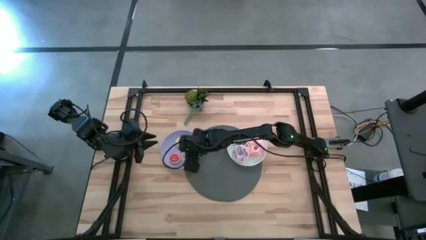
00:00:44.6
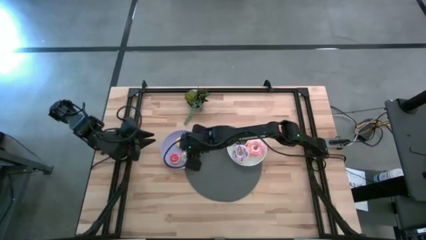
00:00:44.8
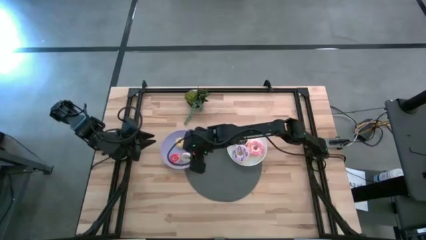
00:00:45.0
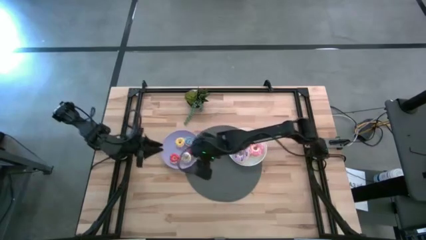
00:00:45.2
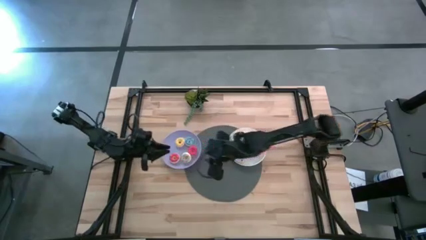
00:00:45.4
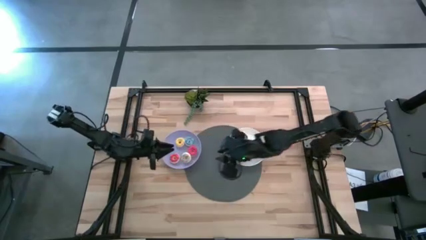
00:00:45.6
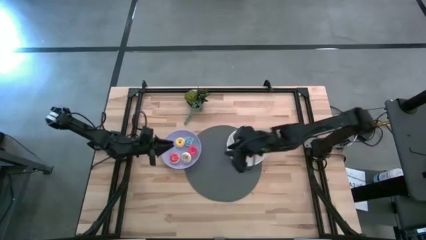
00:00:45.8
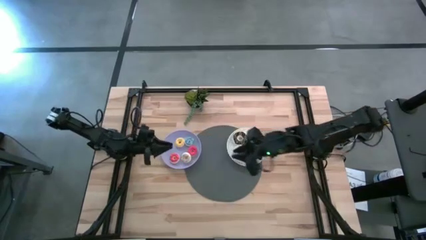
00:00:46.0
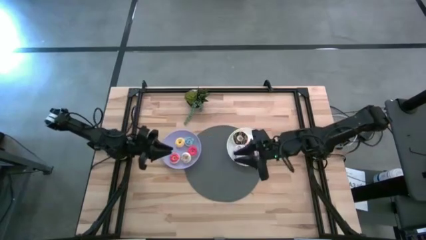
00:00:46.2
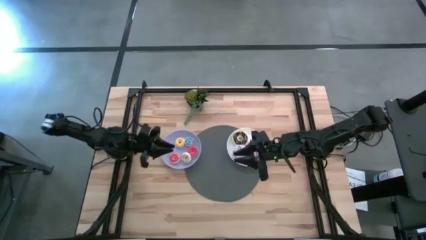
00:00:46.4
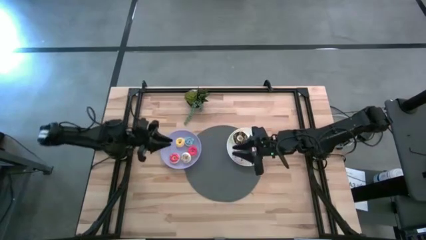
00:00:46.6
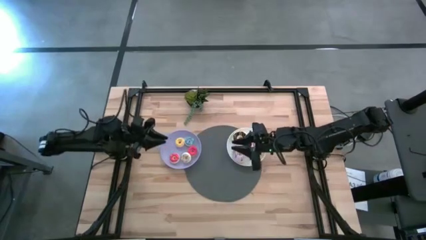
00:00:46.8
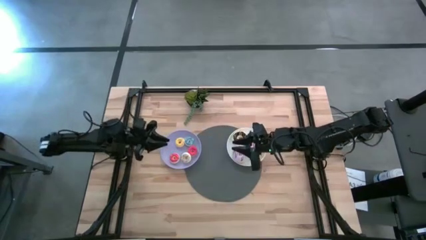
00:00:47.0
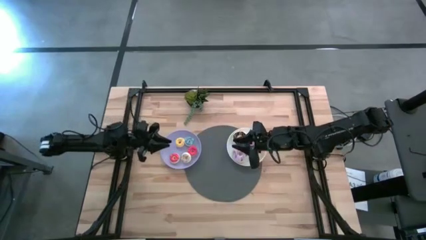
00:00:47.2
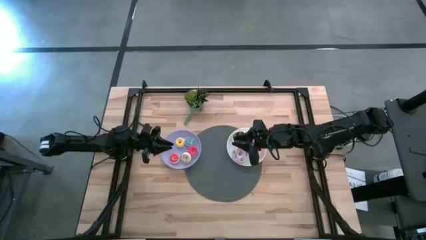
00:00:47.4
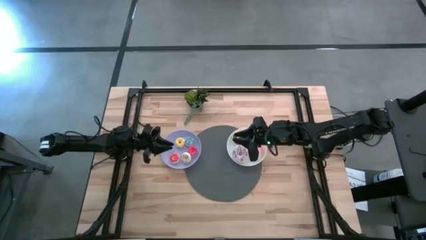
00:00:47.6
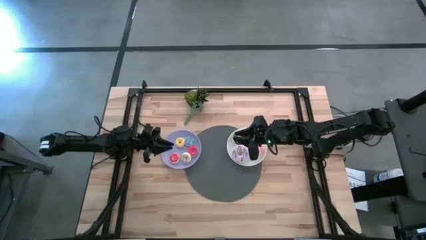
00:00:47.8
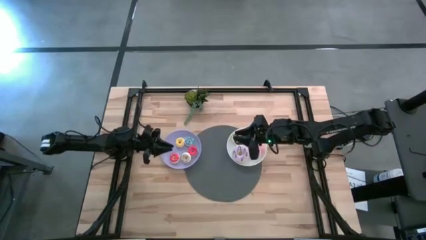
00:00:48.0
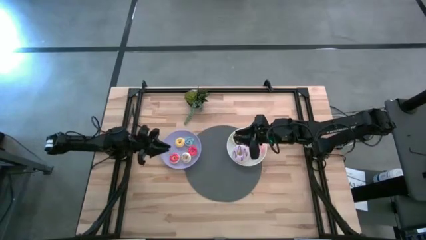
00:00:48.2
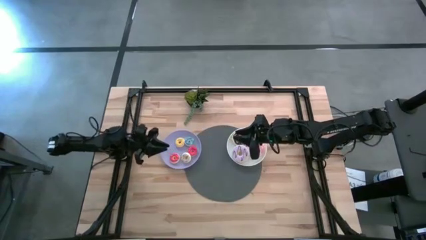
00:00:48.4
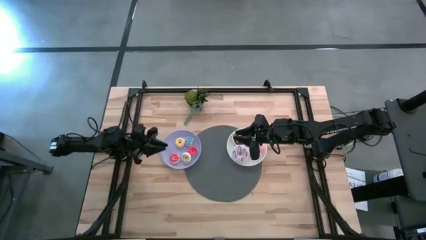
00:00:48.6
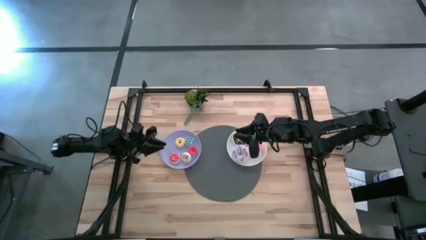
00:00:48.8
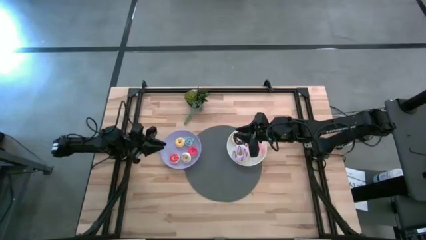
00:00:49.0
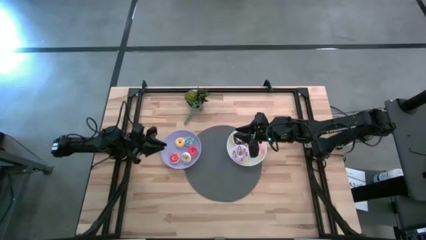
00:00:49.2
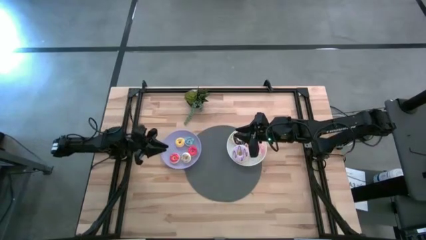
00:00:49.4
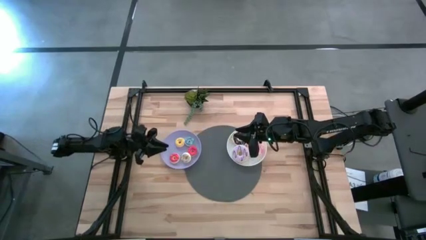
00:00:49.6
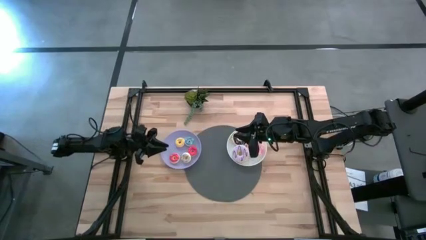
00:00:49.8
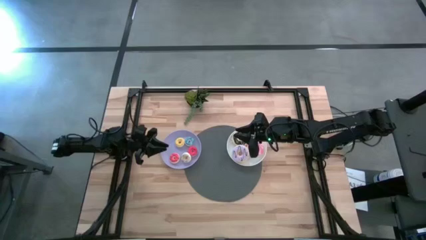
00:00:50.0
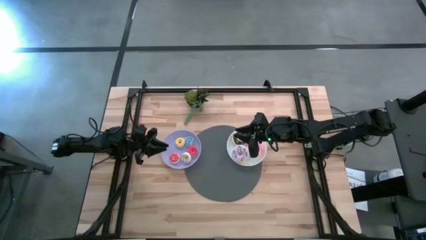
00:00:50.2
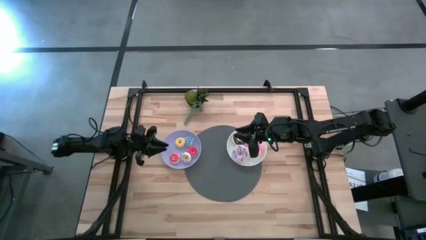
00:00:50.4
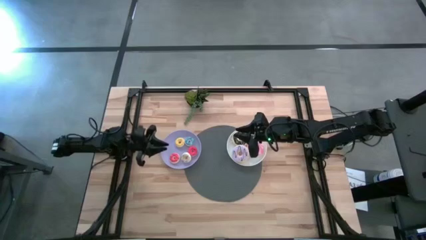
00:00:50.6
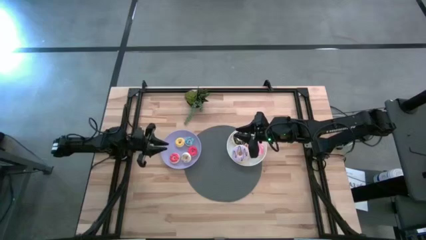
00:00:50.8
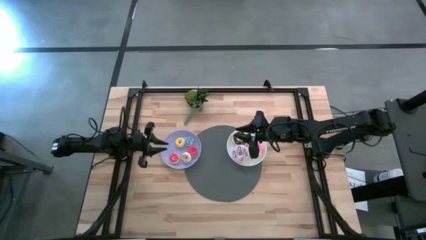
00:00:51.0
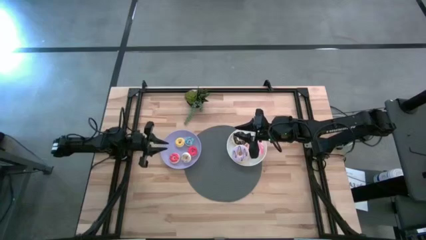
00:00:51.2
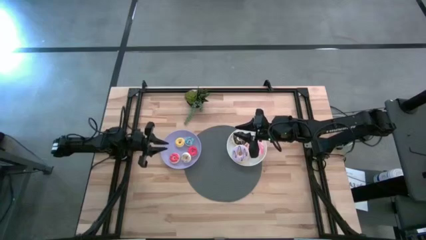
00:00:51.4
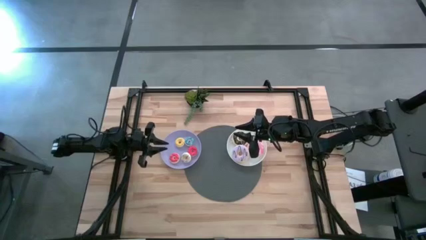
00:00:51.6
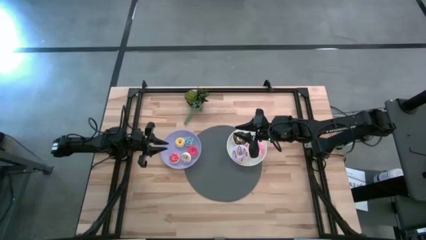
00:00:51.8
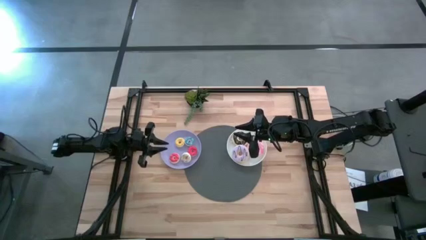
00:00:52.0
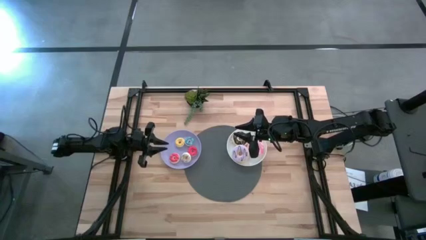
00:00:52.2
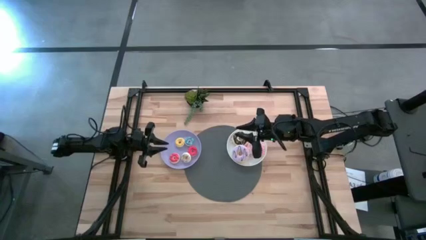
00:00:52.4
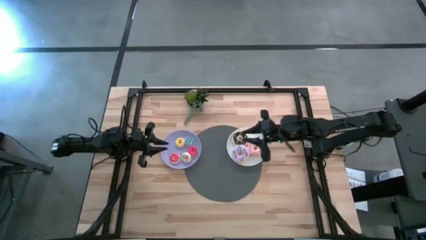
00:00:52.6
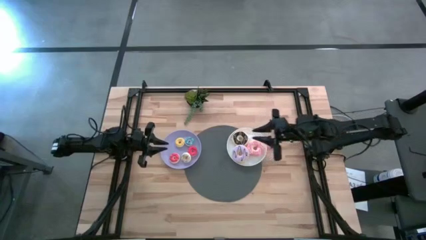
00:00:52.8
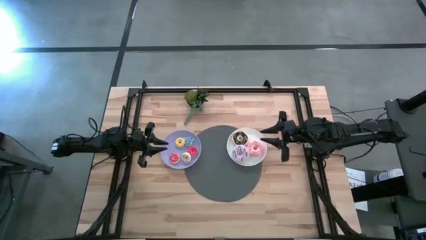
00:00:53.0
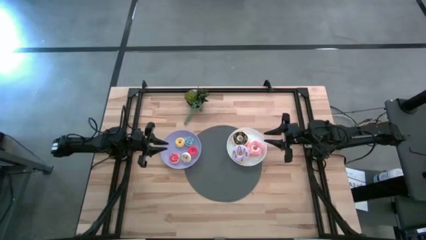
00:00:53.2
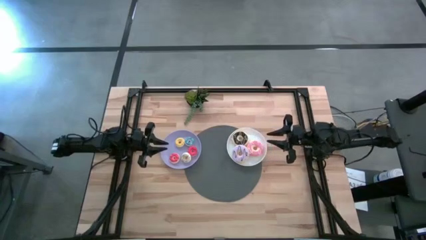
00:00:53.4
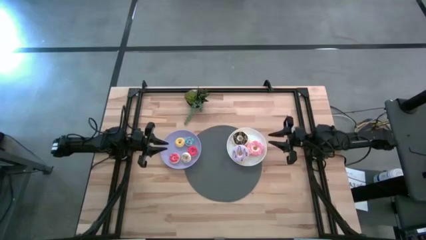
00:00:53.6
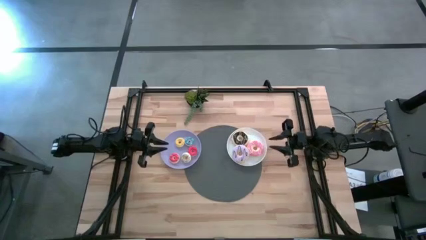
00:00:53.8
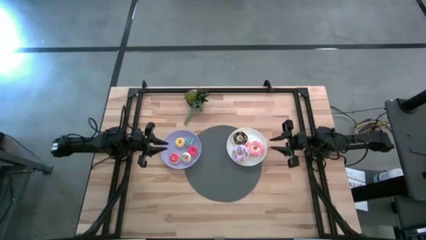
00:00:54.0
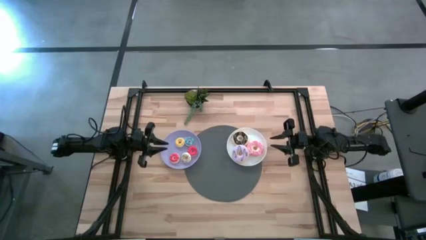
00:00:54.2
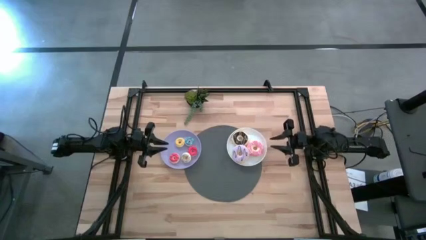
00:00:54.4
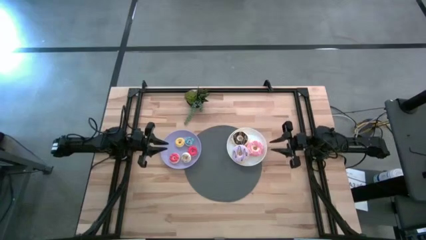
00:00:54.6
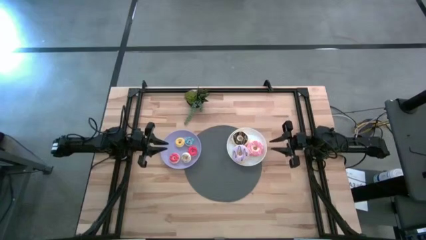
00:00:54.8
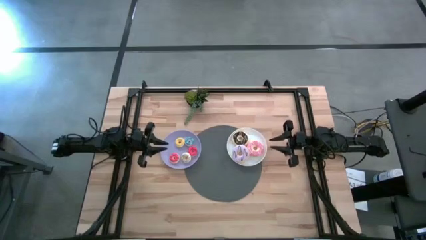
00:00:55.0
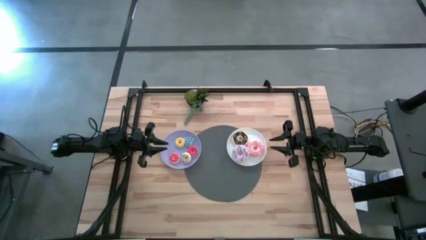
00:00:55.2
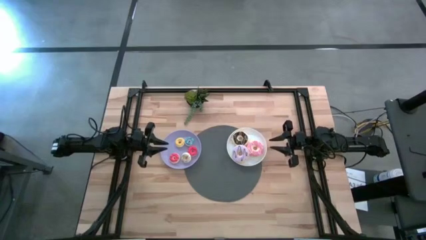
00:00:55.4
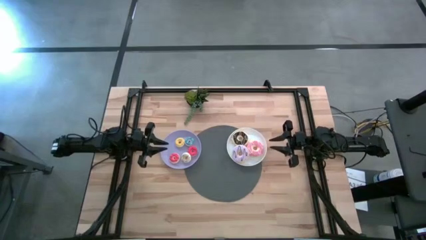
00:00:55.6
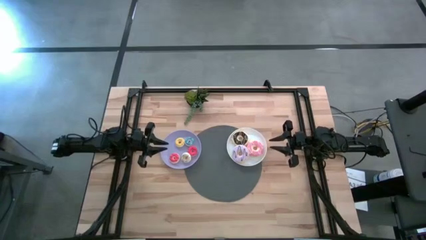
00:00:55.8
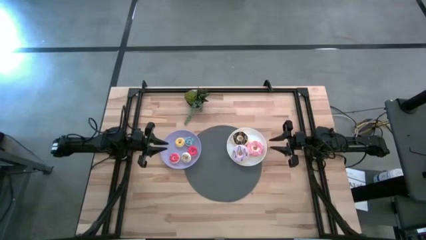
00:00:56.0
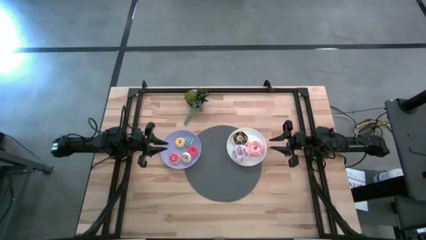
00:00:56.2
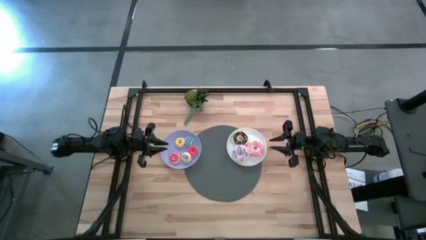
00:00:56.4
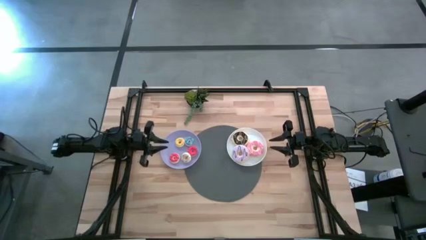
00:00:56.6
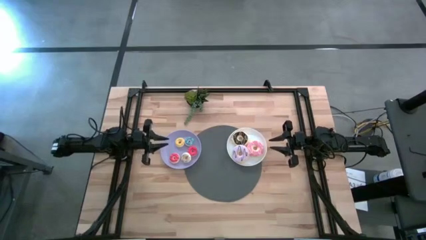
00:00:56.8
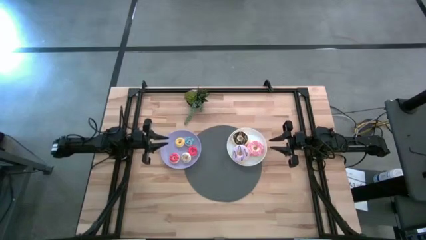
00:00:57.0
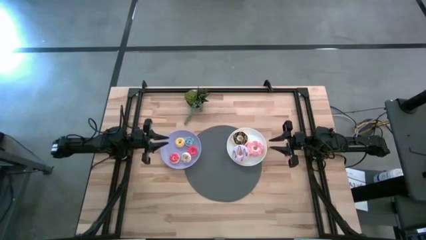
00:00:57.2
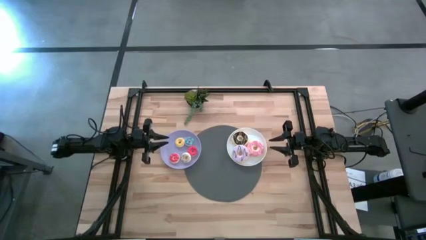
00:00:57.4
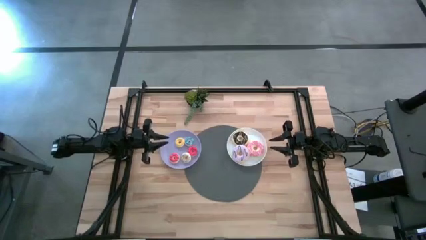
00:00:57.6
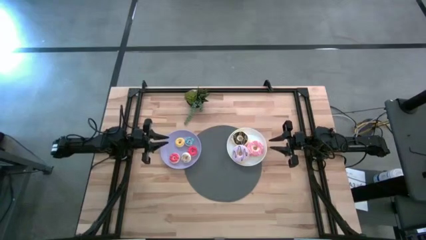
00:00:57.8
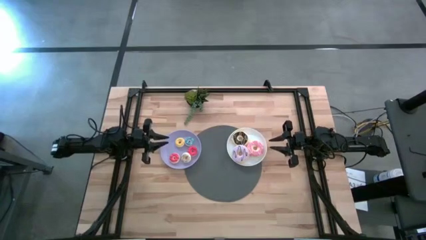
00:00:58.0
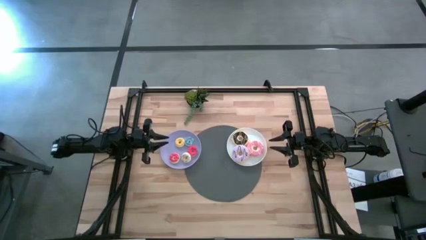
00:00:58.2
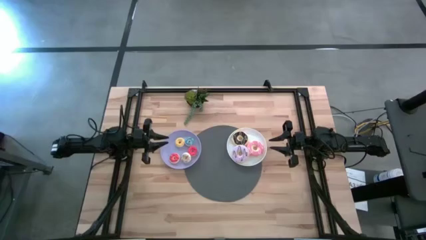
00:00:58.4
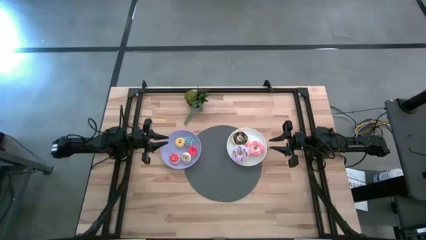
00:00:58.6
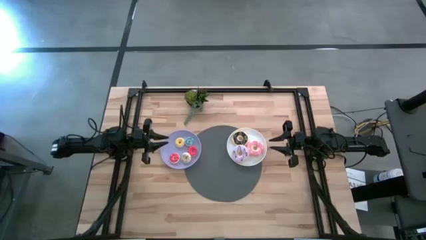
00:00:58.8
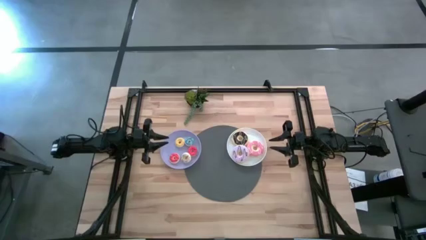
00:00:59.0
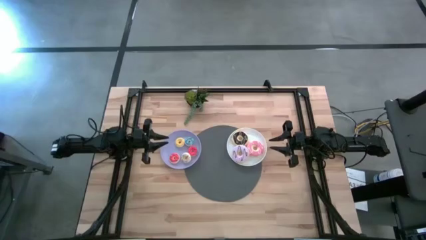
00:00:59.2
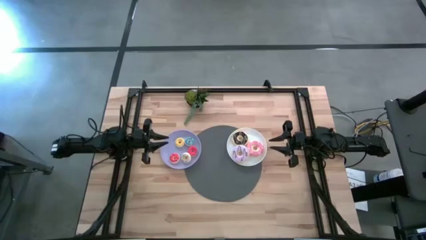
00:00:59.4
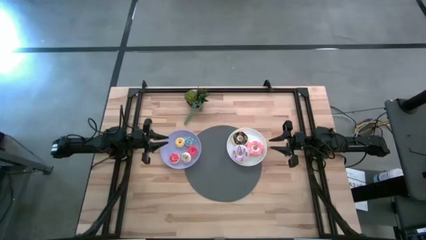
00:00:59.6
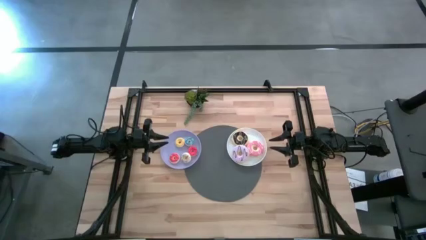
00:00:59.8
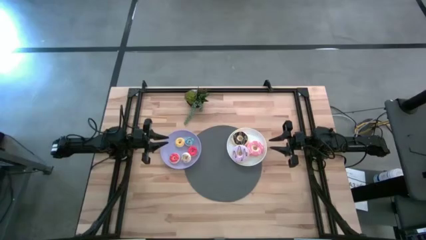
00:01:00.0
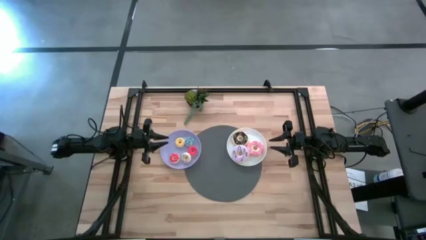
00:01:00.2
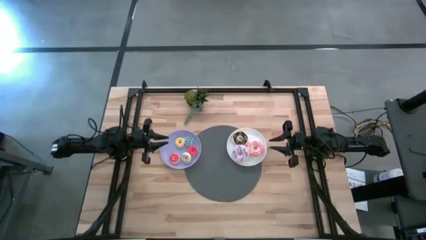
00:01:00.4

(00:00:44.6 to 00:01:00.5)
Task: Pick & Place donuts
Return to Home Position
